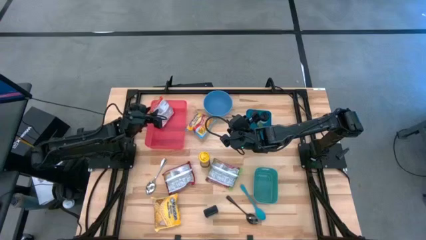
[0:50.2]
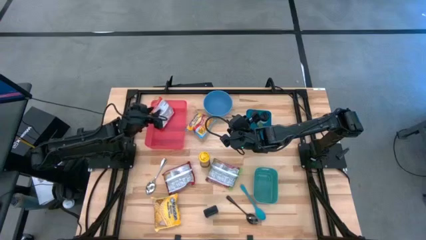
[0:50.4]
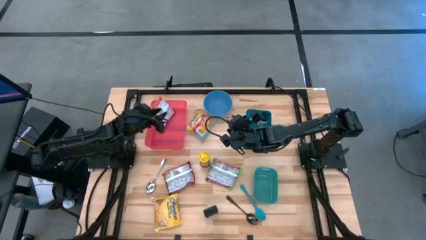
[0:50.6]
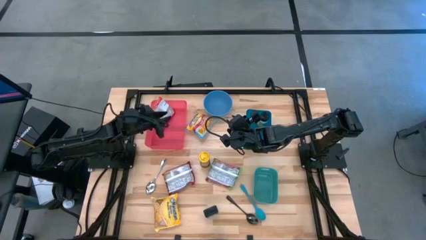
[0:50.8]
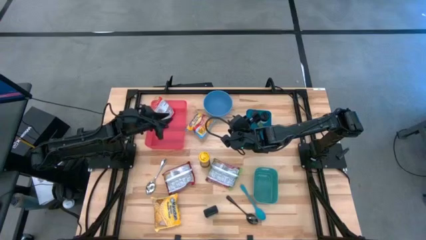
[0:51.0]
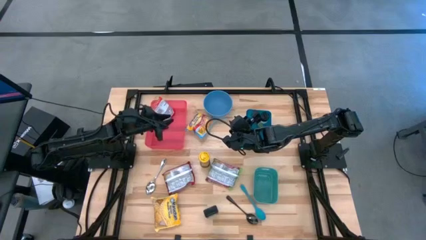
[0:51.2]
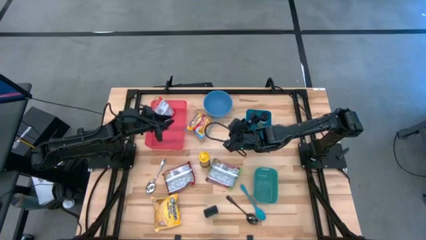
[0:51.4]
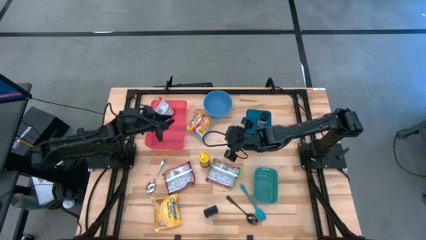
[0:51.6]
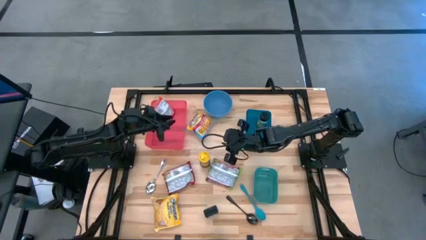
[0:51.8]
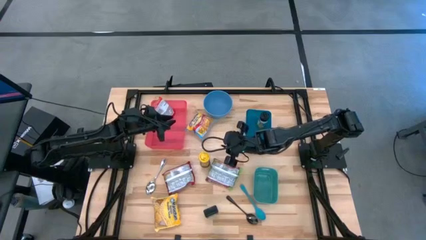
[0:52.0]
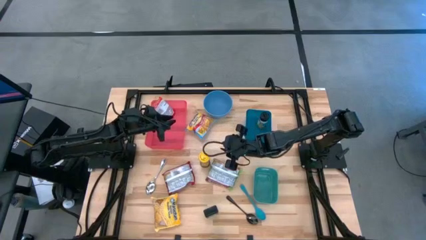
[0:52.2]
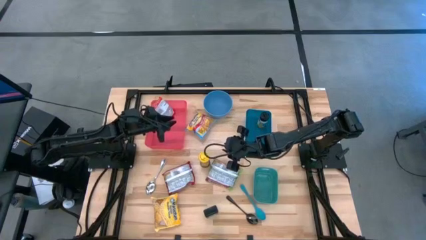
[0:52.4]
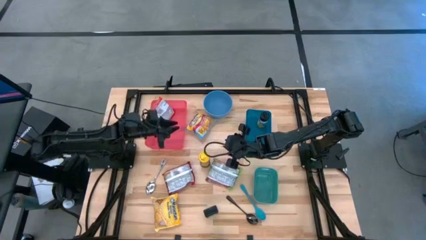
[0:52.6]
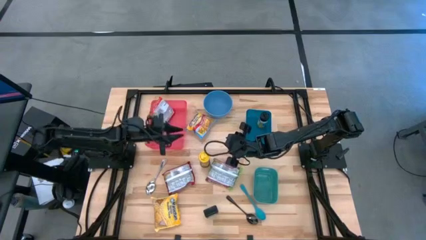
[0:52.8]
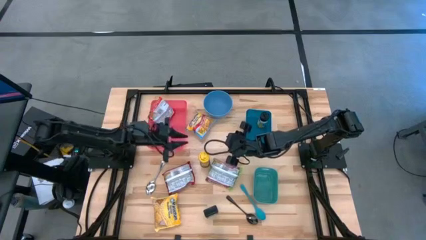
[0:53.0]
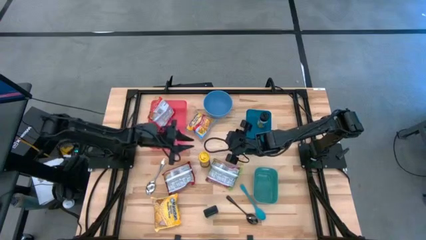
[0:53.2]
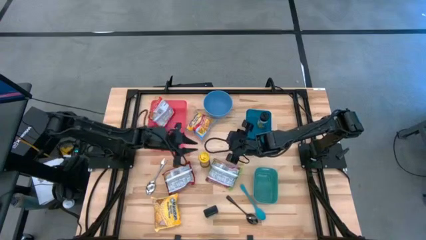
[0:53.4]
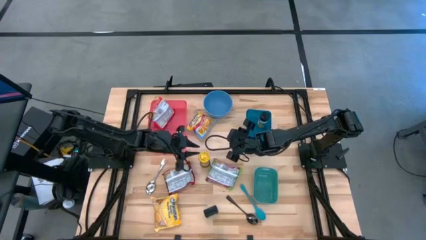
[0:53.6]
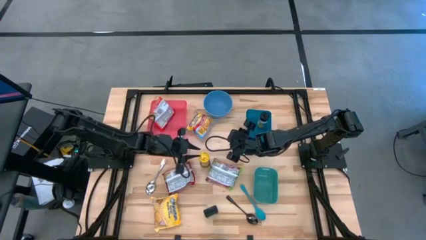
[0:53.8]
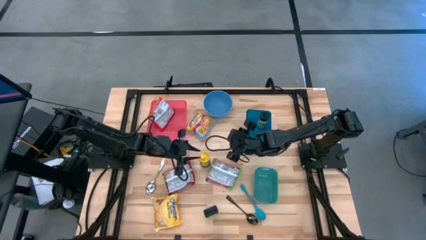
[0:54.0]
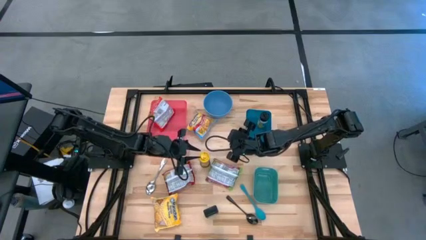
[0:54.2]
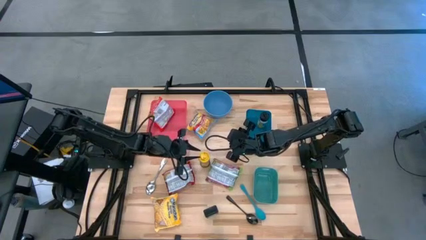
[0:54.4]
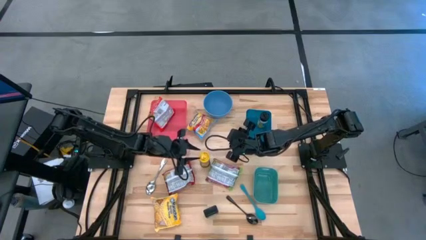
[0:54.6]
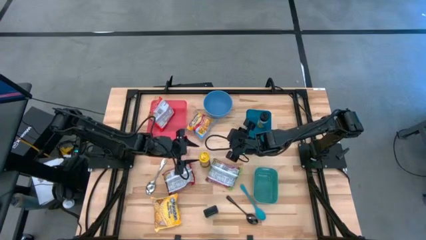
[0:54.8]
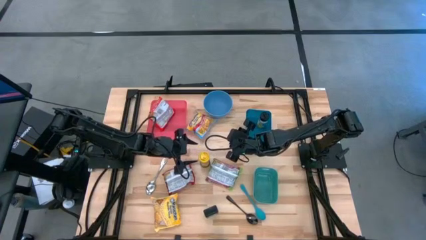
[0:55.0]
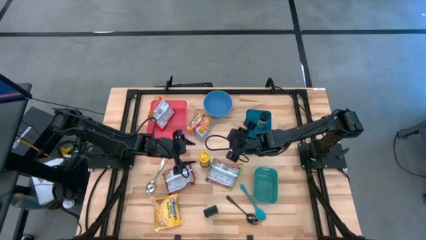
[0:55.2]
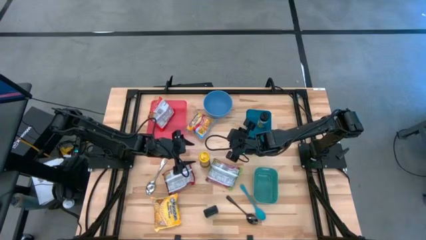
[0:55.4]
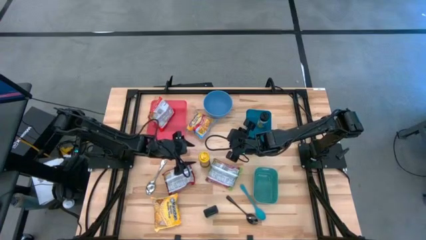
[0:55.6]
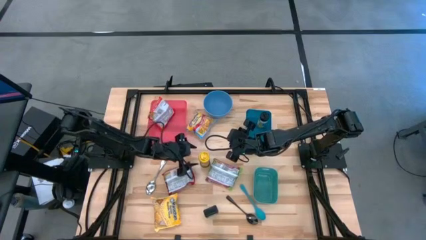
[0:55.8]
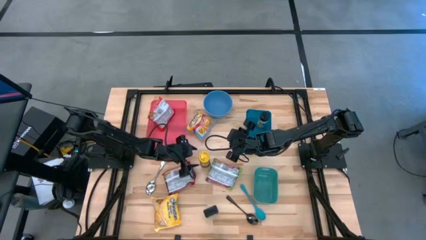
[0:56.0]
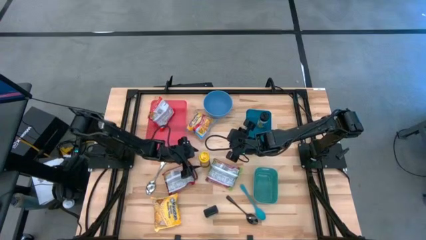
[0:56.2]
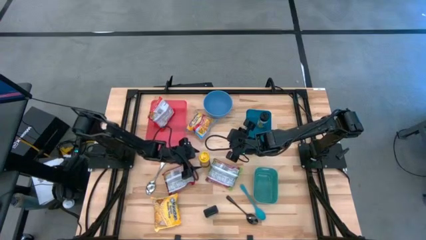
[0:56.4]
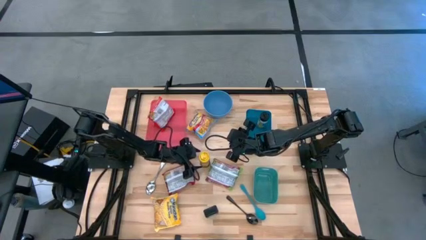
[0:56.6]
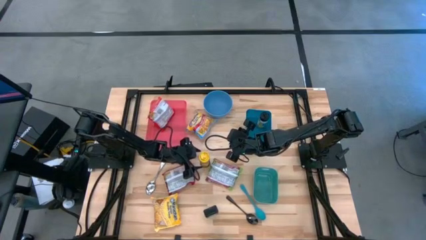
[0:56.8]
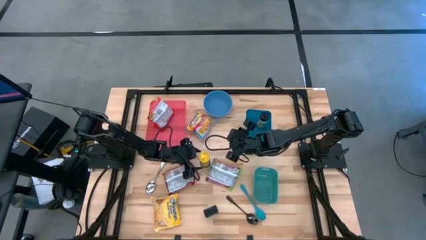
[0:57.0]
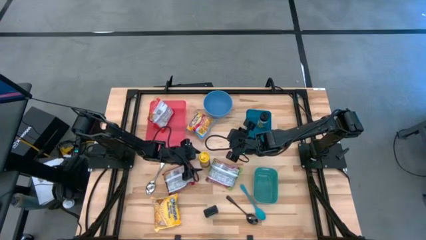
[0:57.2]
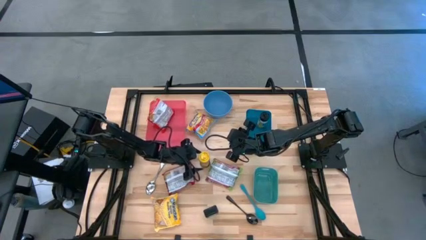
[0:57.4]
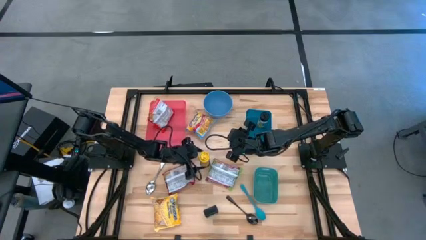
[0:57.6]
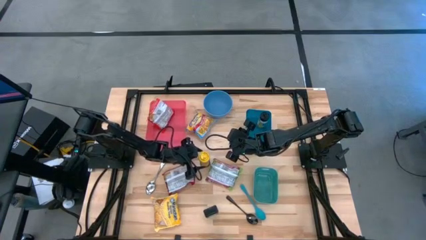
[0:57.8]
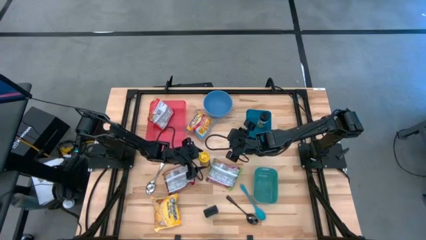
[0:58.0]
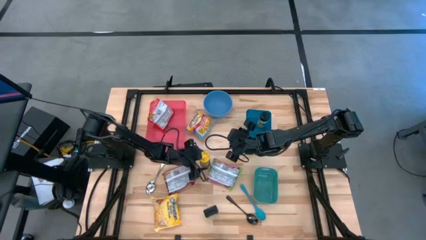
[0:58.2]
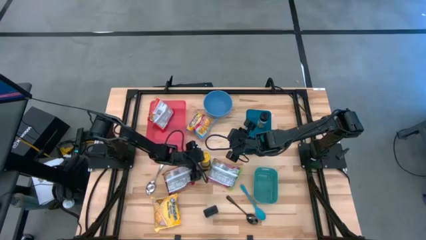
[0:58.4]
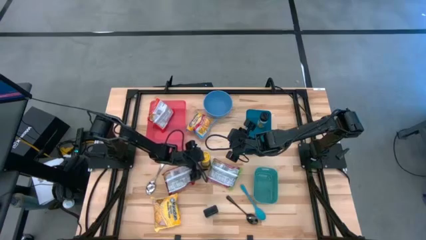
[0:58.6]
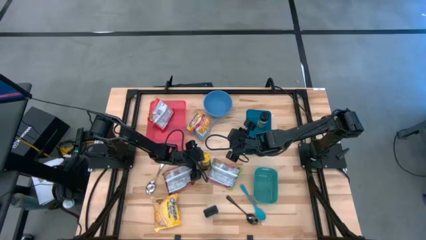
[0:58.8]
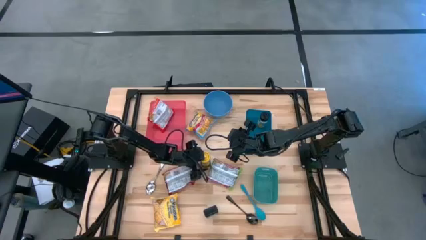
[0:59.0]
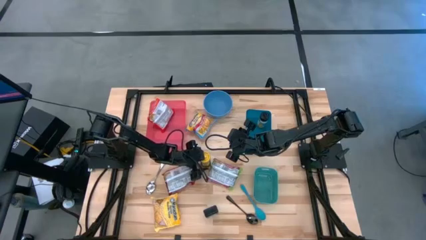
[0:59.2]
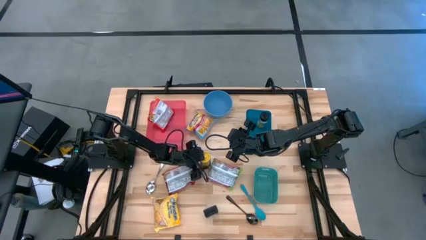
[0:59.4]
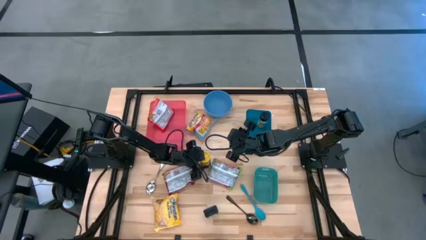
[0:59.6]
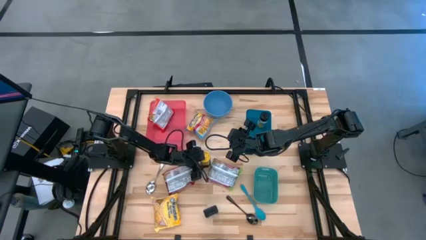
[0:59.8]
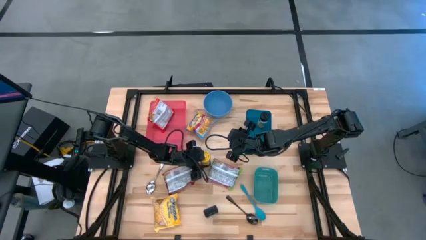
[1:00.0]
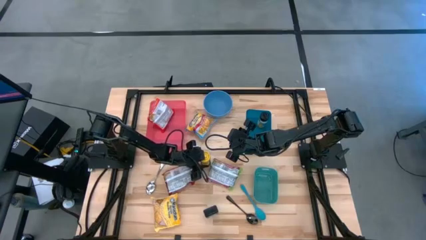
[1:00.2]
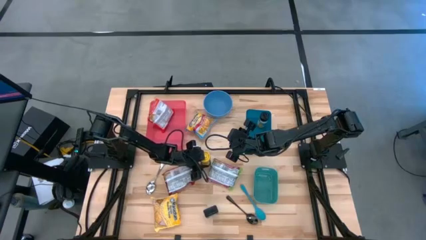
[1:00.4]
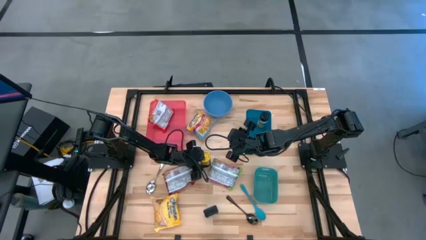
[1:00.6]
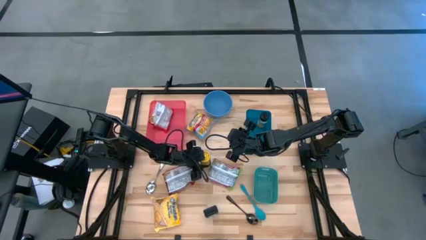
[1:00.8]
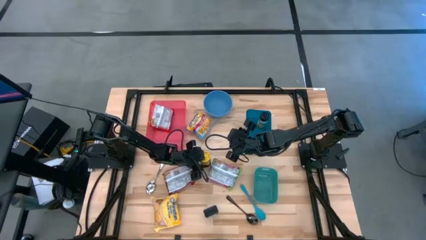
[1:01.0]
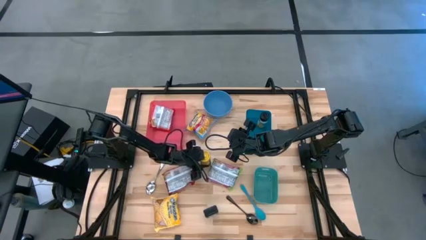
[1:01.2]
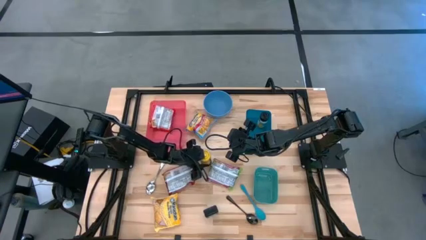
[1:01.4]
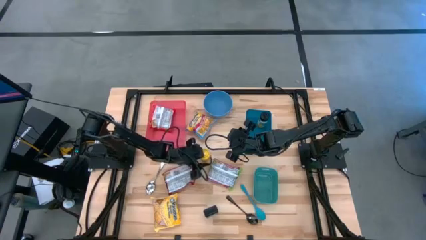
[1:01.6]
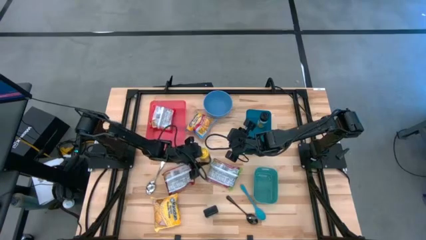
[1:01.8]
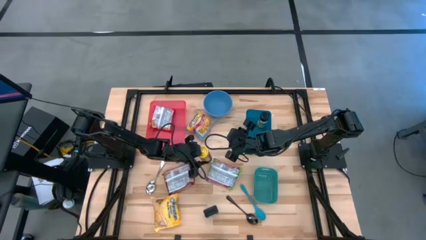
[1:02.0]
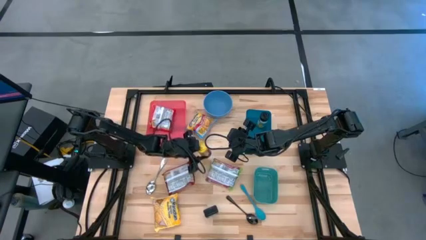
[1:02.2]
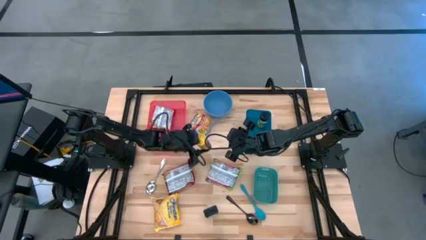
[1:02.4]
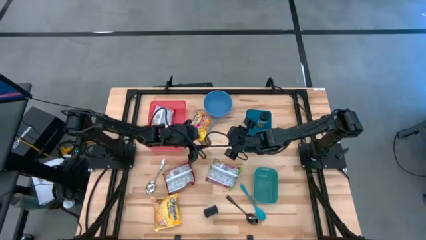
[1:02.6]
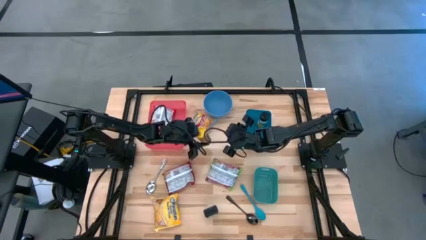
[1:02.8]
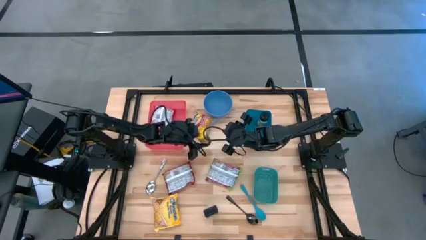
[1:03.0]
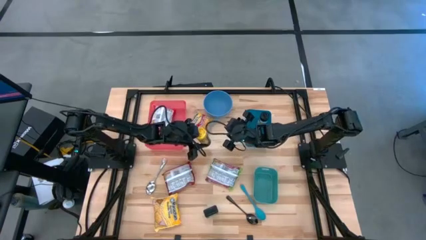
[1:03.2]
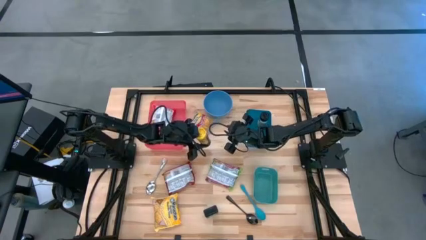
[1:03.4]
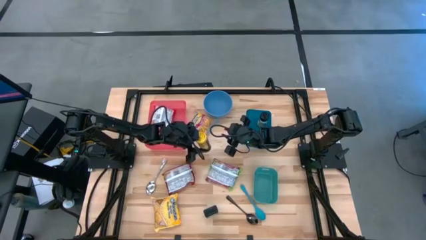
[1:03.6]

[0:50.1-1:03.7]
Task: Pick & Place Food Item
Put the yellow seasoning bottle into the blue bin

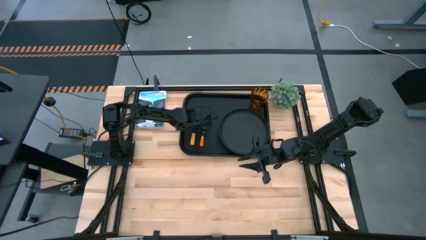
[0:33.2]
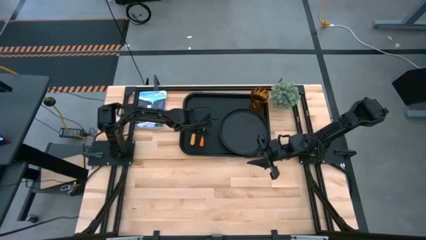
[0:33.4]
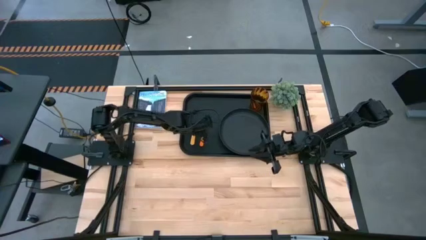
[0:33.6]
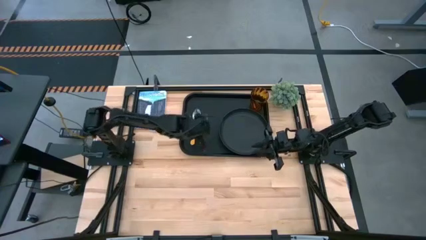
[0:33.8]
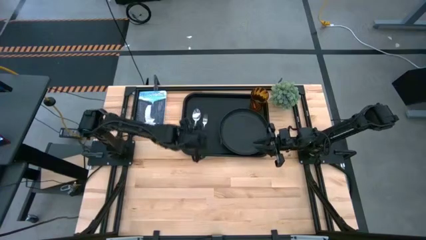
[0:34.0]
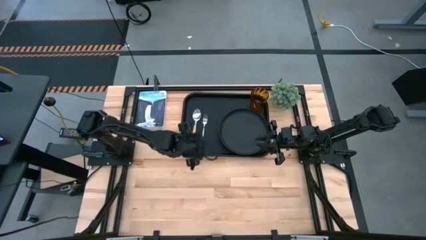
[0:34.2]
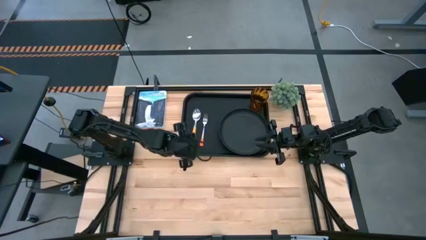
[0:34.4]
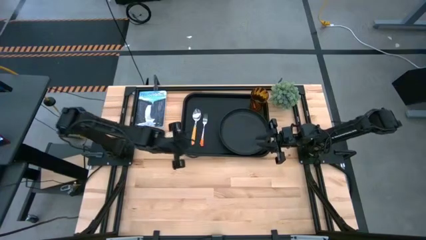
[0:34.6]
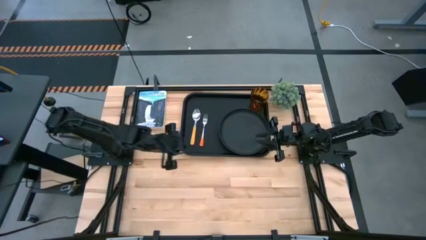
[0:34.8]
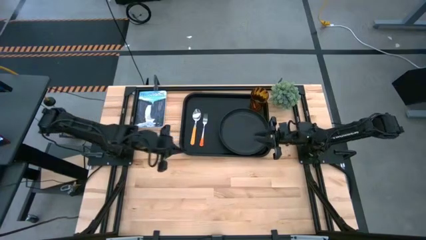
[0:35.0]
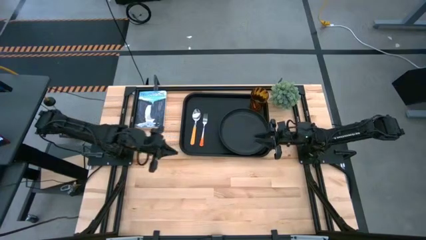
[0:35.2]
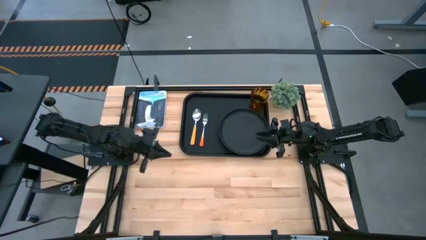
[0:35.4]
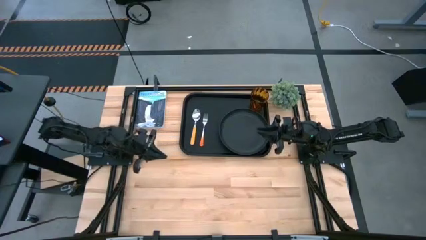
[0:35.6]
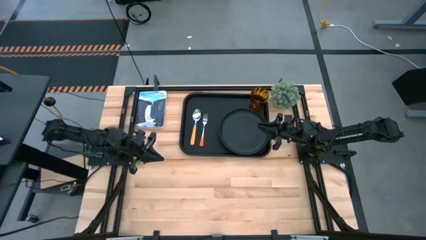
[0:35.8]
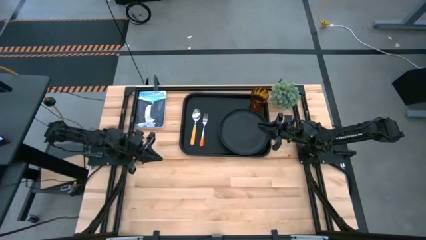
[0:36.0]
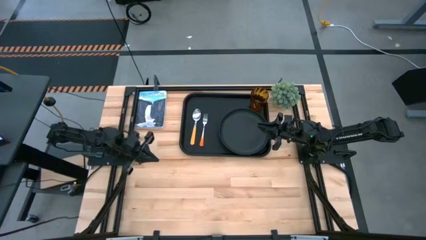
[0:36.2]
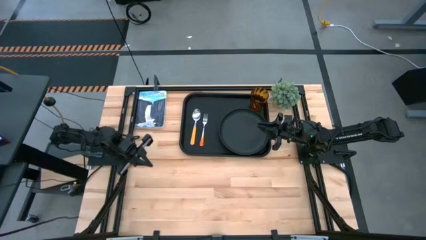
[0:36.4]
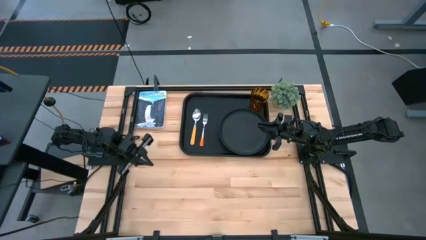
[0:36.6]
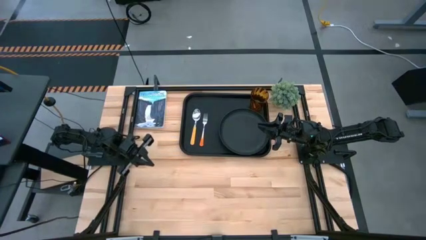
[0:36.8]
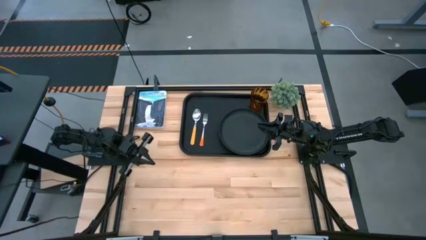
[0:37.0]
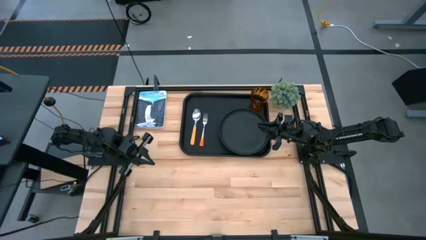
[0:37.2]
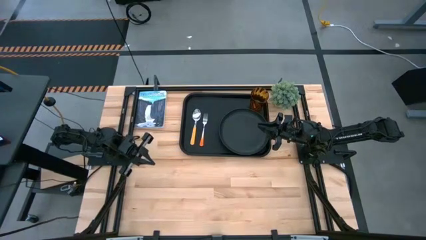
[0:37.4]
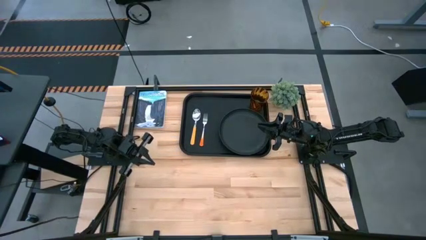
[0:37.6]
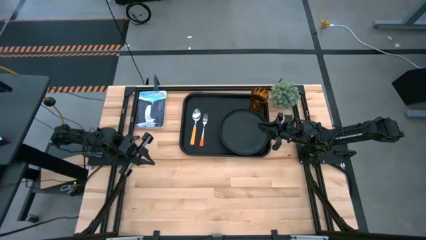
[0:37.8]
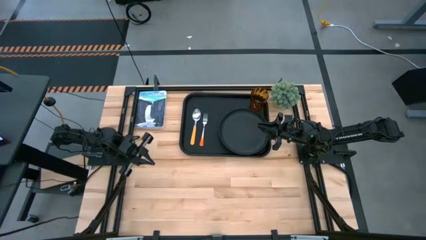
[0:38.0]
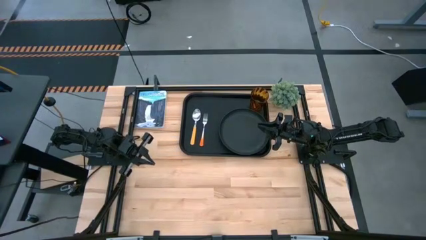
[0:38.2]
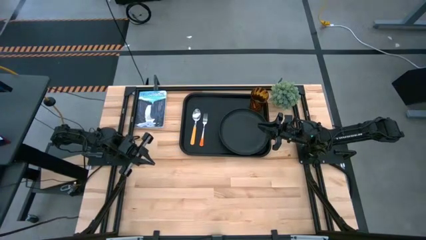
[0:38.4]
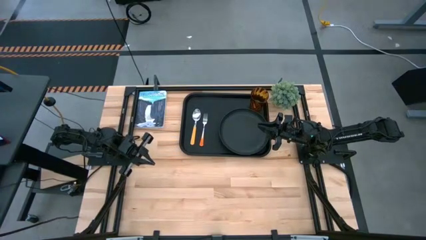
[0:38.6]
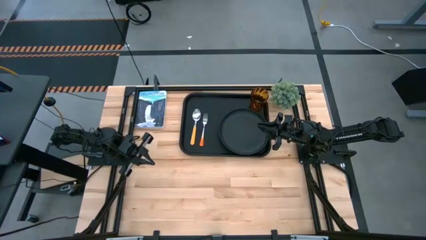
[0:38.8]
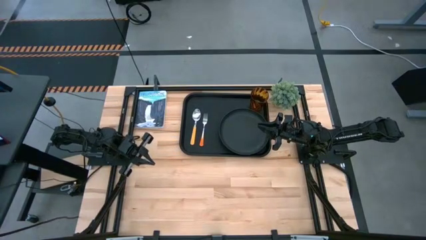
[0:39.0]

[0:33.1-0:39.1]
Task: Pick and place plate/cup/fork/spoon on tray
Return to Home Position
